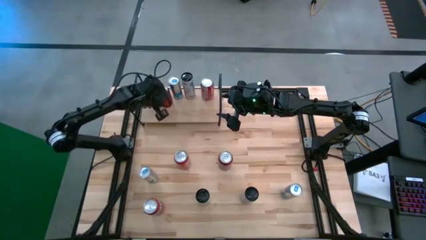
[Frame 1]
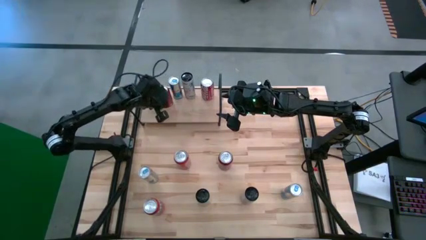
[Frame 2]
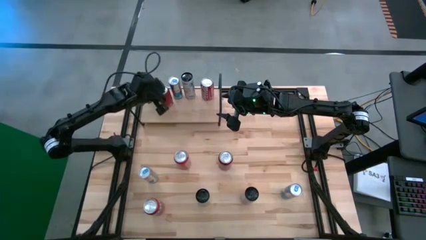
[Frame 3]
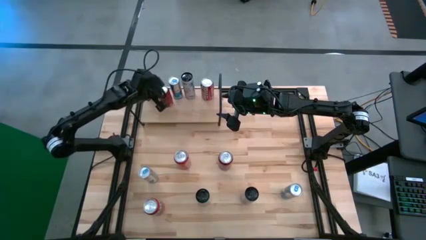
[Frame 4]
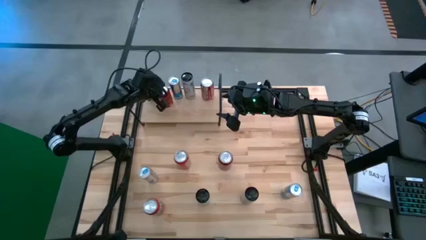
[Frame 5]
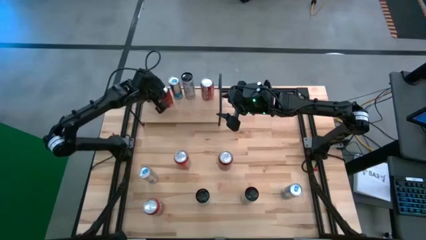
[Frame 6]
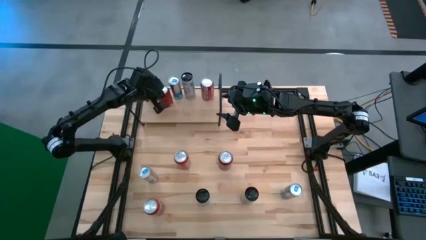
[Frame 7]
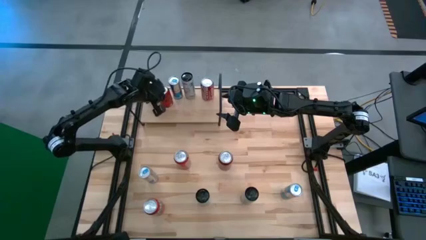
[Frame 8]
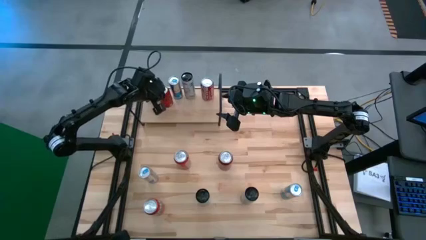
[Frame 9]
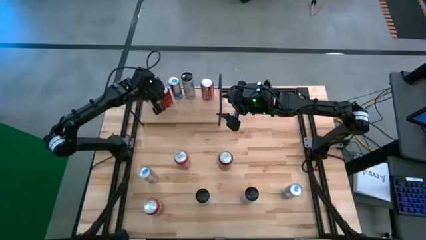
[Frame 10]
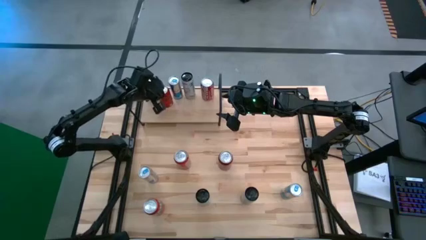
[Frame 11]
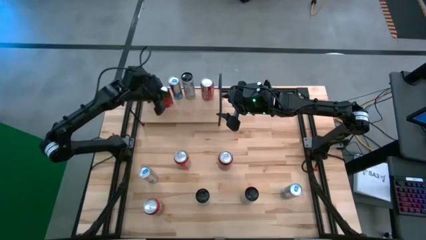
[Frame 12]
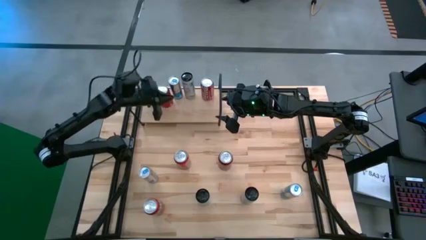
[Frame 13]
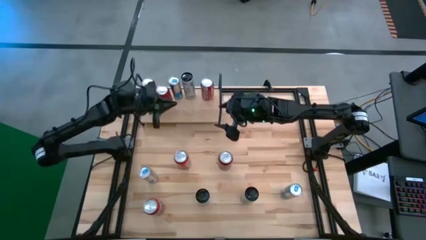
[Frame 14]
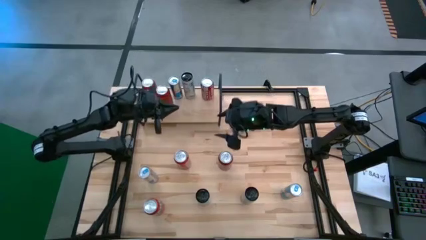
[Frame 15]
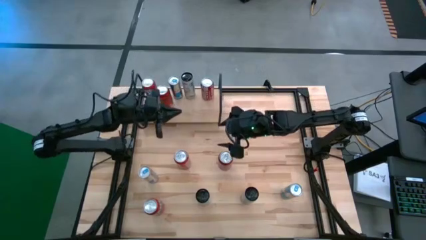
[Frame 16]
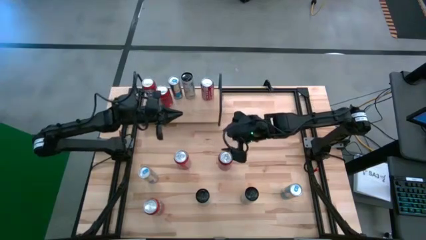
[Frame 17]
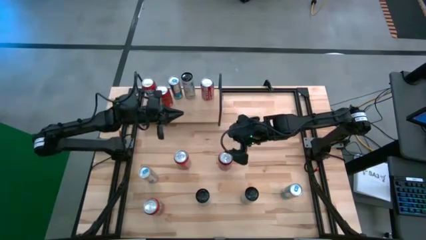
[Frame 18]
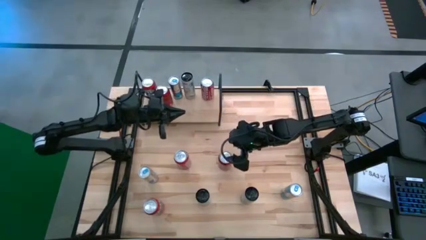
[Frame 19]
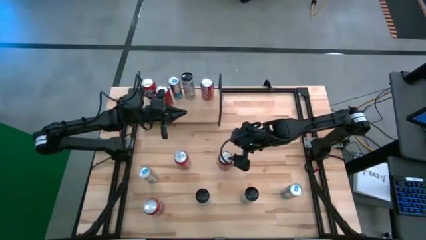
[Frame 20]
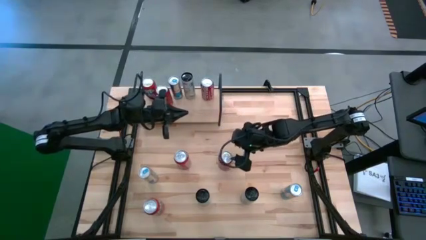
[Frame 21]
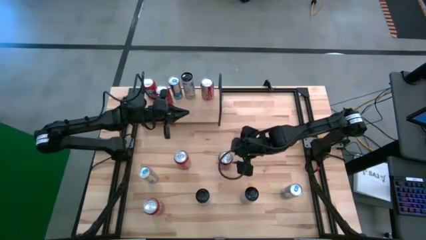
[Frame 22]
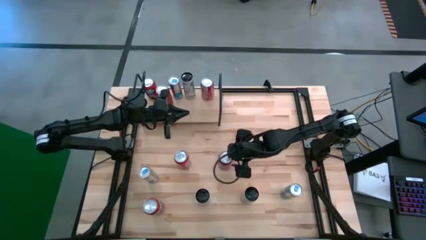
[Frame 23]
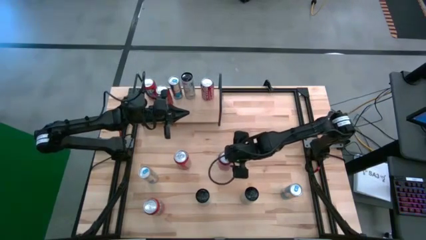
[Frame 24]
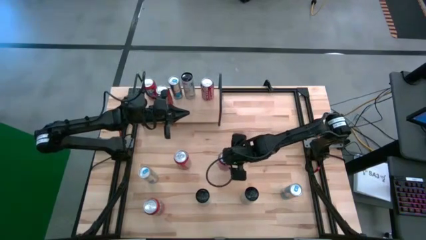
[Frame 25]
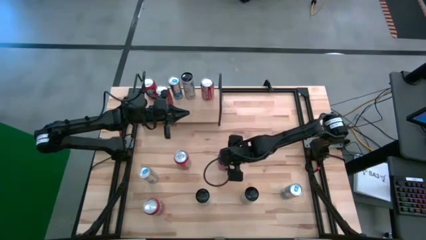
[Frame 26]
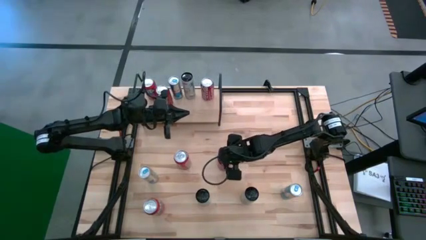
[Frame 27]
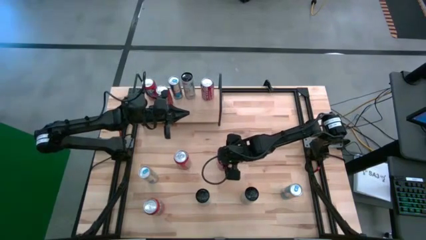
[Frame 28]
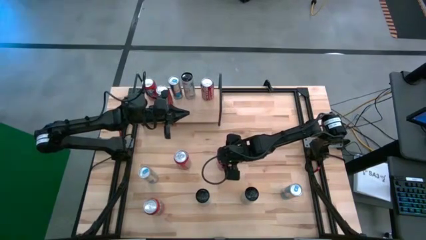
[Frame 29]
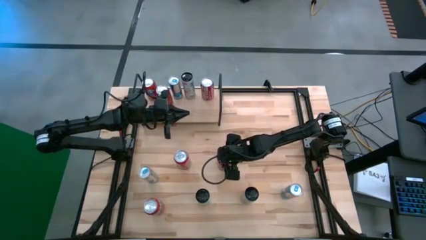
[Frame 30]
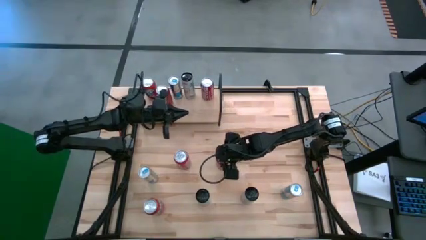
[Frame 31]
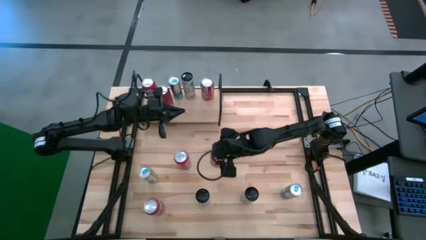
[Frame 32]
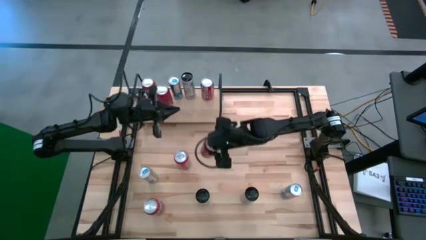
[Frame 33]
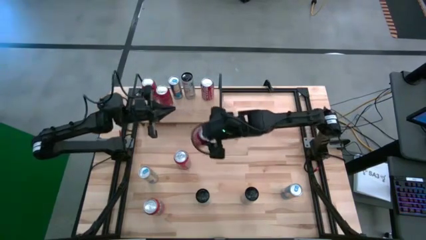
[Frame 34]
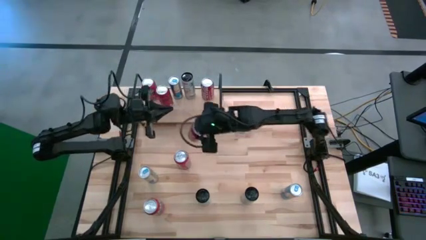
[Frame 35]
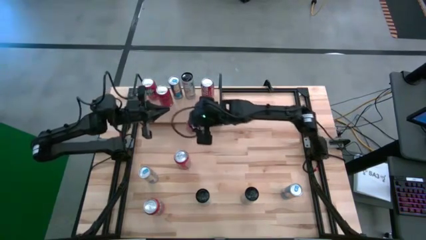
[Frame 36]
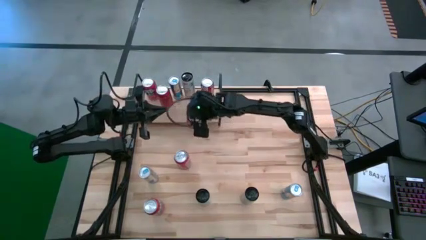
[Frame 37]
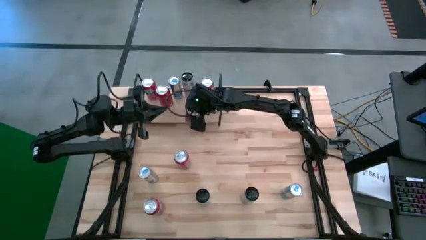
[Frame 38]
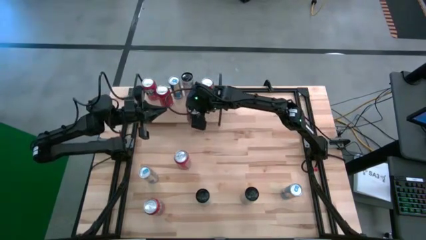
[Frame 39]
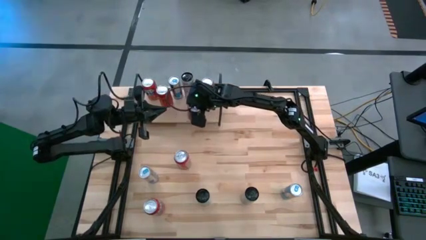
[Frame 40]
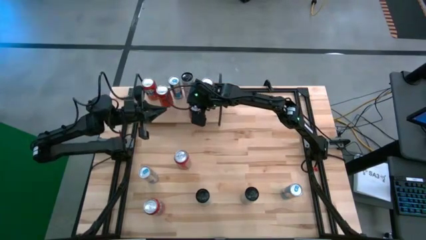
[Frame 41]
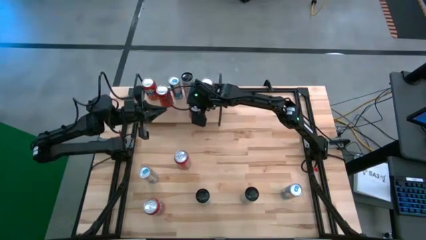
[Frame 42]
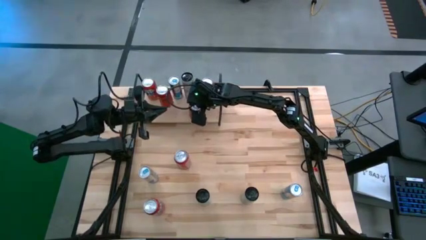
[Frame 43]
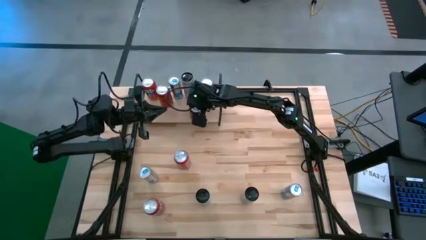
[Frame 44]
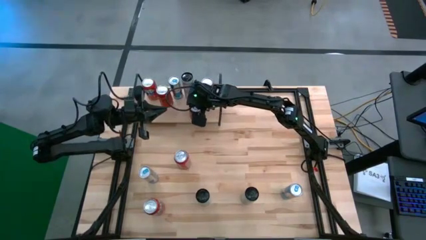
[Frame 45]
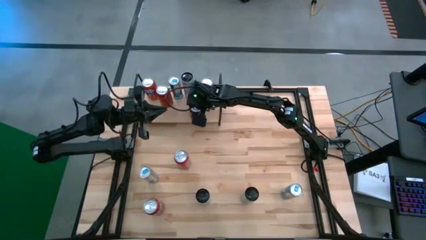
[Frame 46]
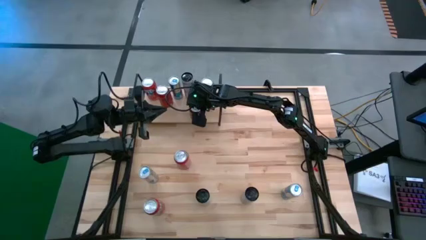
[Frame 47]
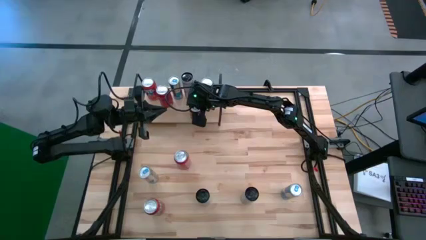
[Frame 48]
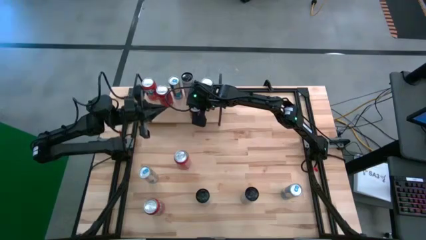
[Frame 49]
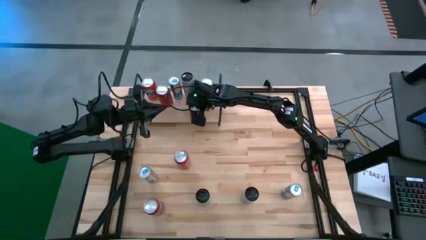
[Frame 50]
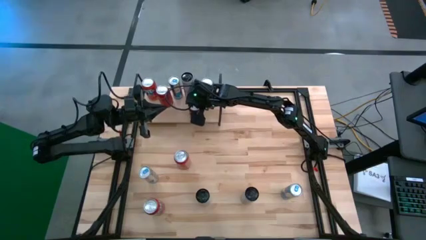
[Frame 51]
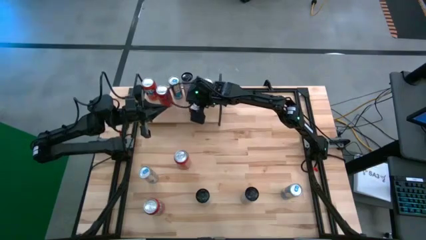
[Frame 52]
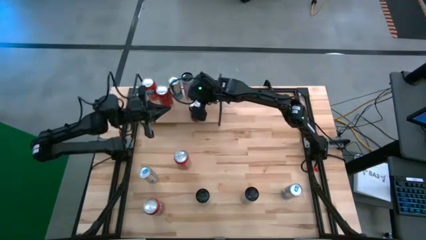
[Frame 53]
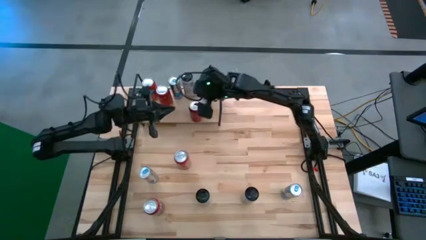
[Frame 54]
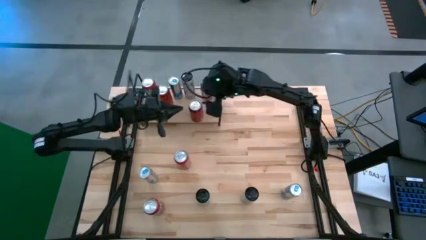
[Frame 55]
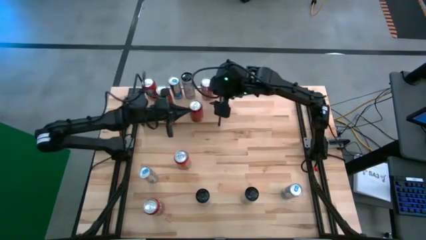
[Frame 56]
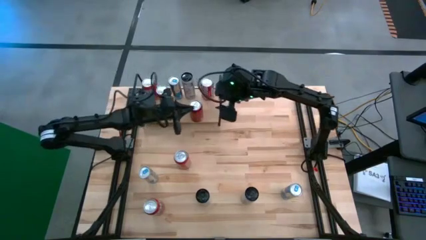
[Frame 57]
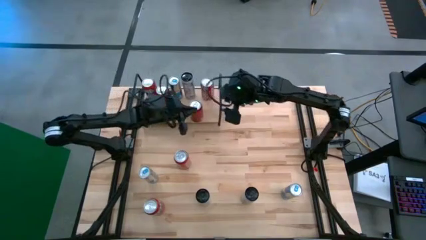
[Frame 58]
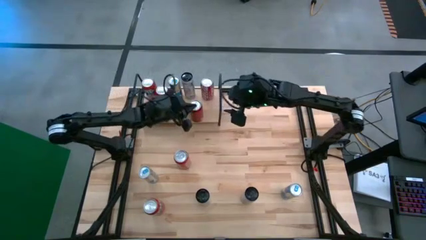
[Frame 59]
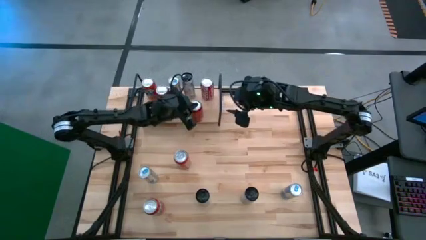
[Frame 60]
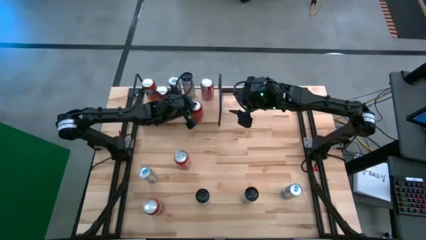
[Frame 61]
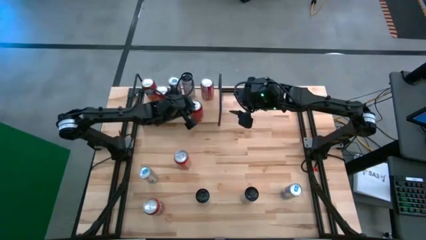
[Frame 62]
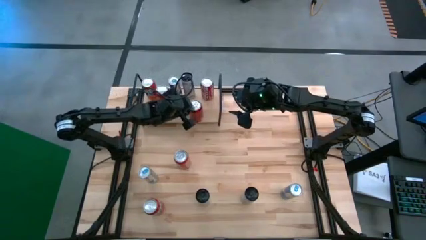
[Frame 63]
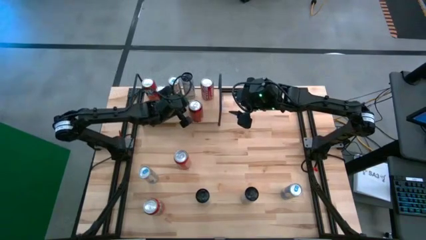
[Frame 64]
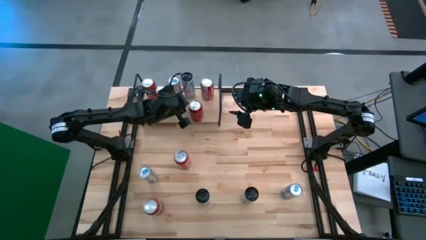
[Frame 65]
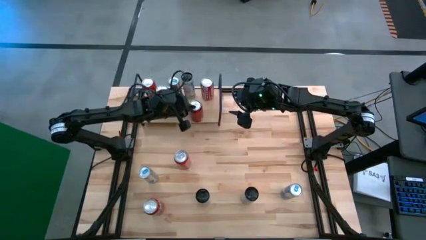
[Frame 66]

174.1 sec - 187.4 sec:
Task: Place canned beverage on shelf
Put the red black soda can on the shelf aligned with the other red black soda can
